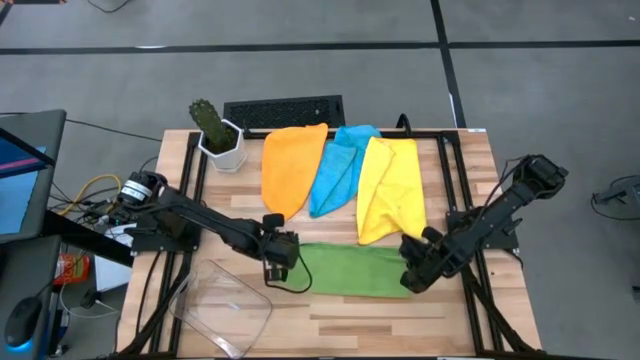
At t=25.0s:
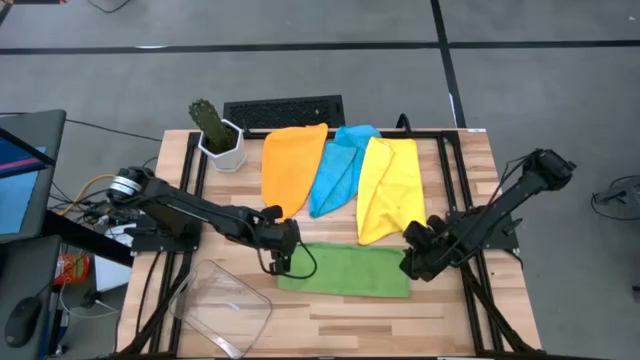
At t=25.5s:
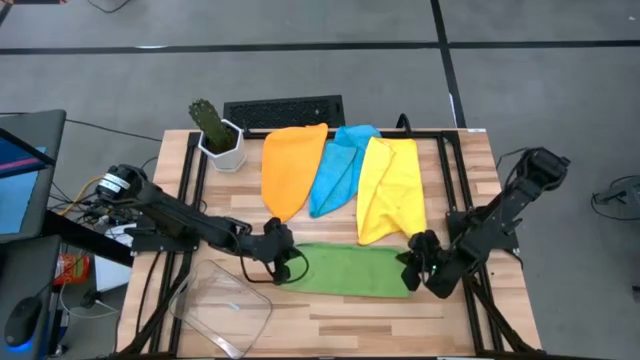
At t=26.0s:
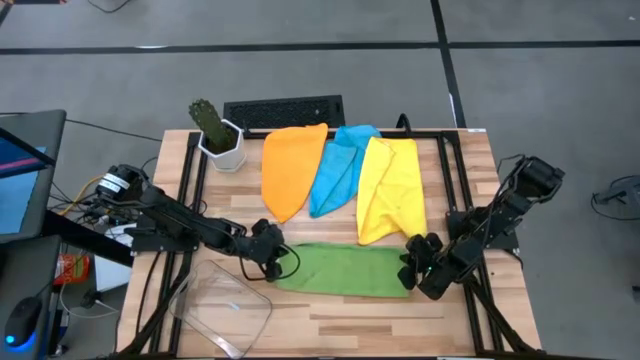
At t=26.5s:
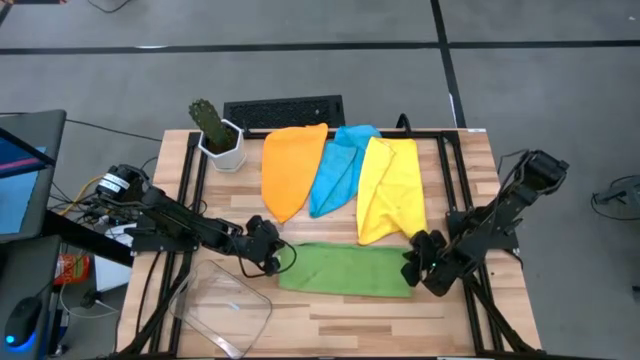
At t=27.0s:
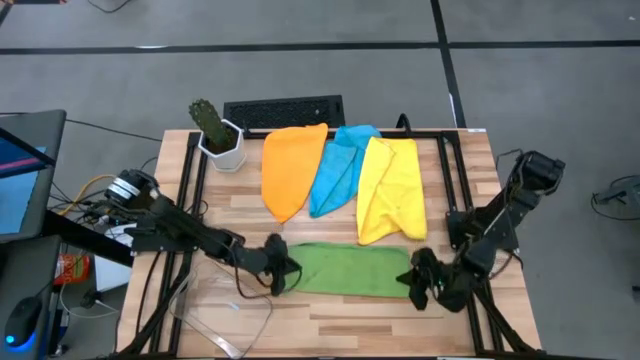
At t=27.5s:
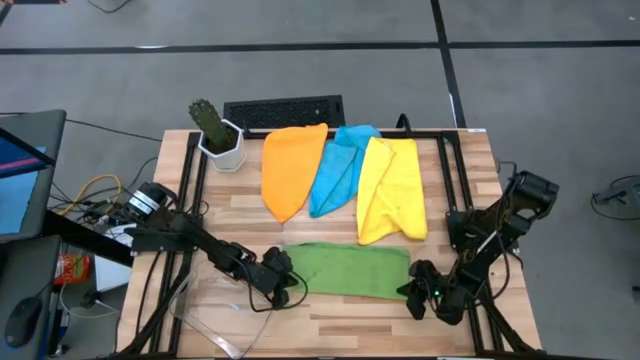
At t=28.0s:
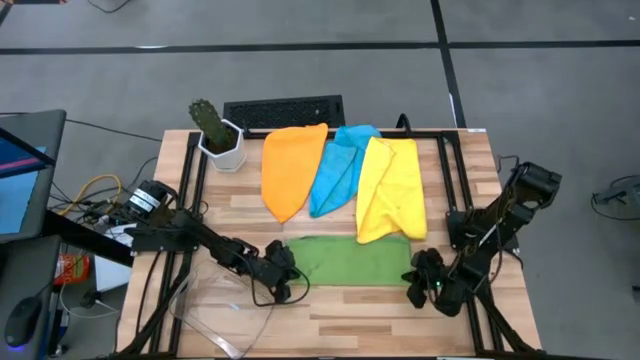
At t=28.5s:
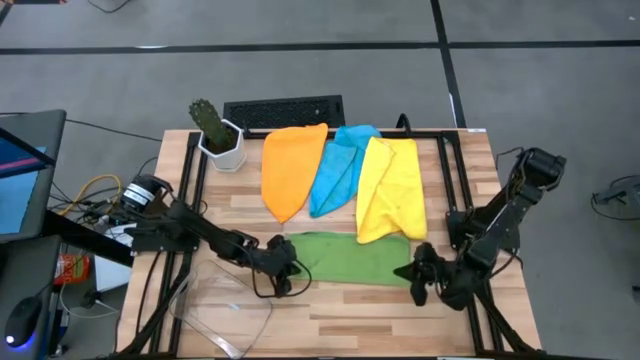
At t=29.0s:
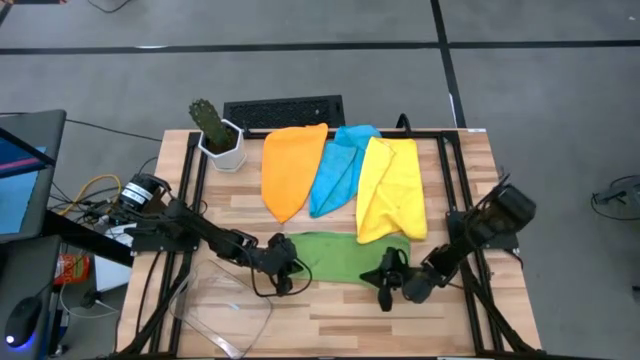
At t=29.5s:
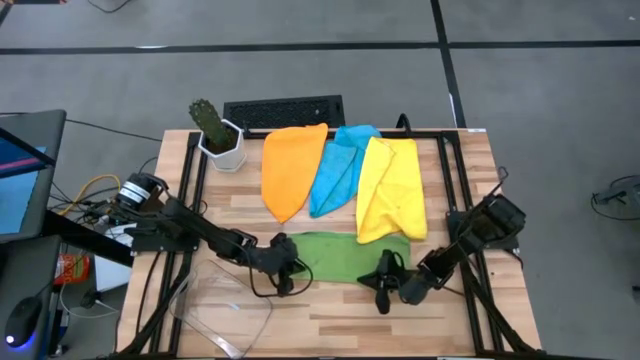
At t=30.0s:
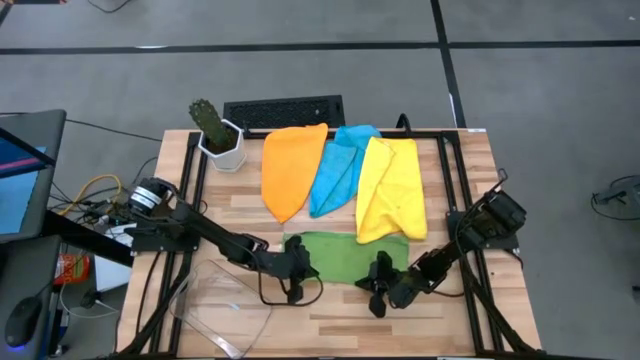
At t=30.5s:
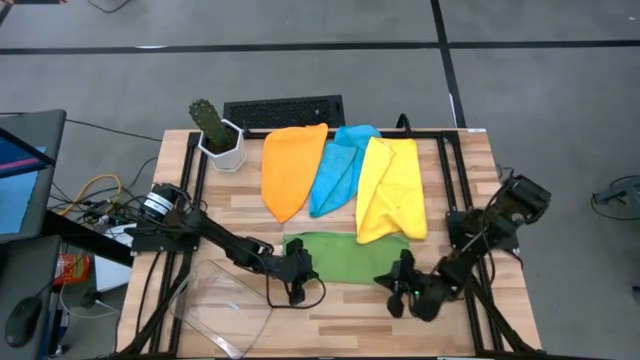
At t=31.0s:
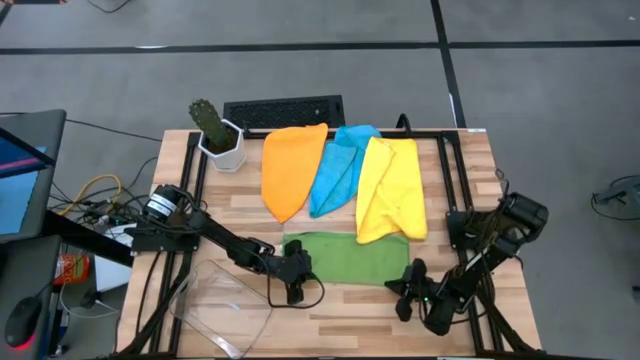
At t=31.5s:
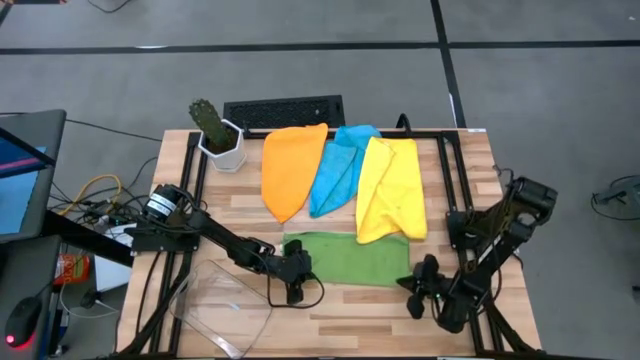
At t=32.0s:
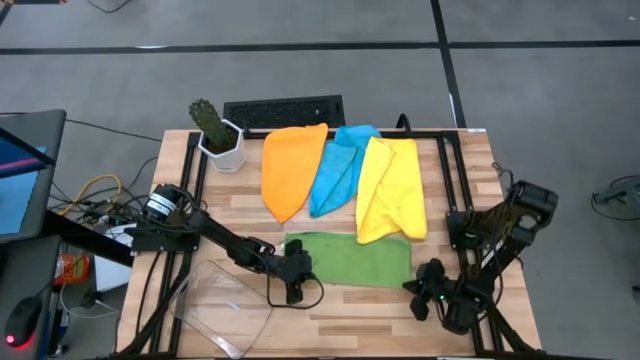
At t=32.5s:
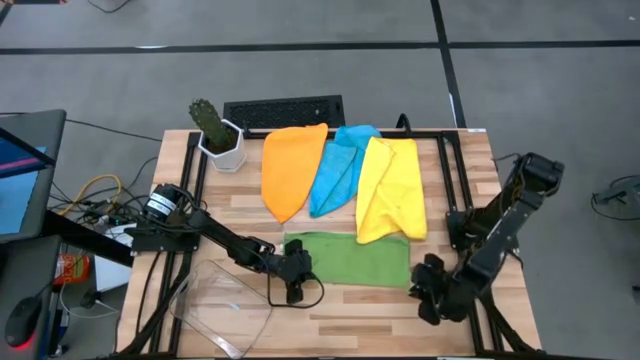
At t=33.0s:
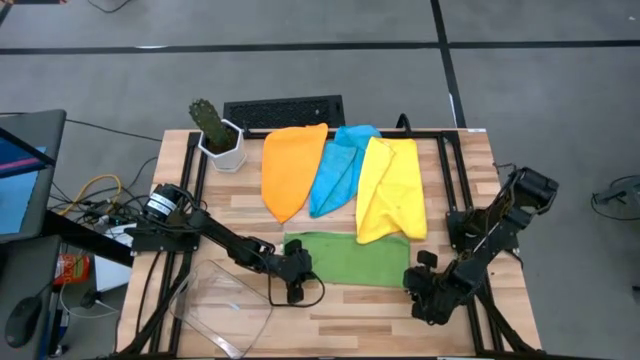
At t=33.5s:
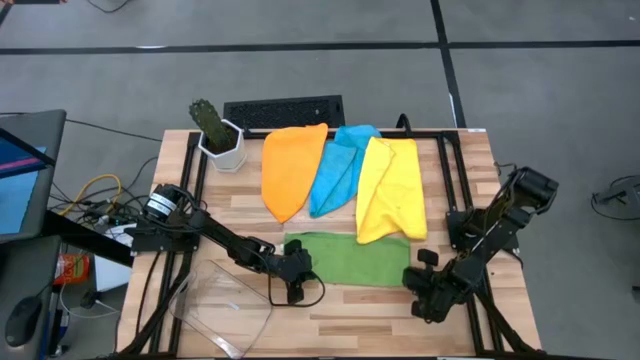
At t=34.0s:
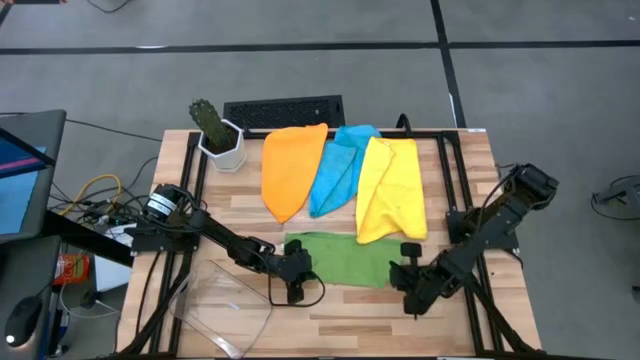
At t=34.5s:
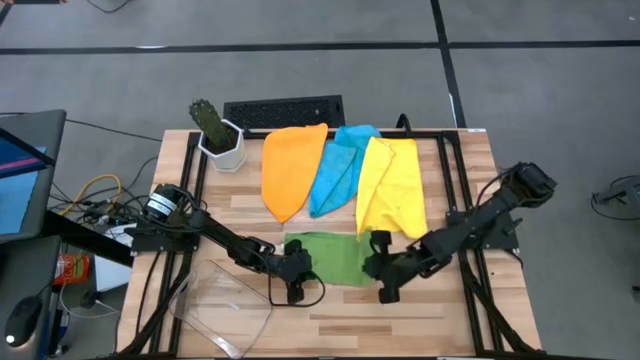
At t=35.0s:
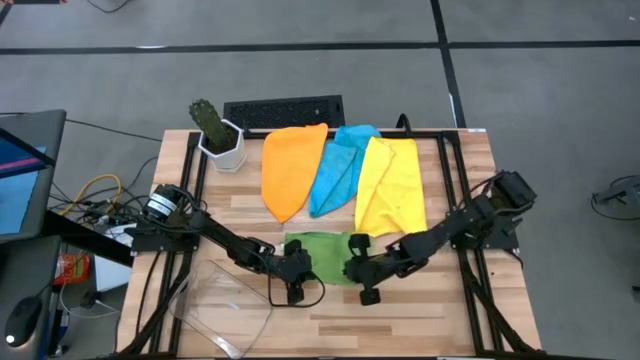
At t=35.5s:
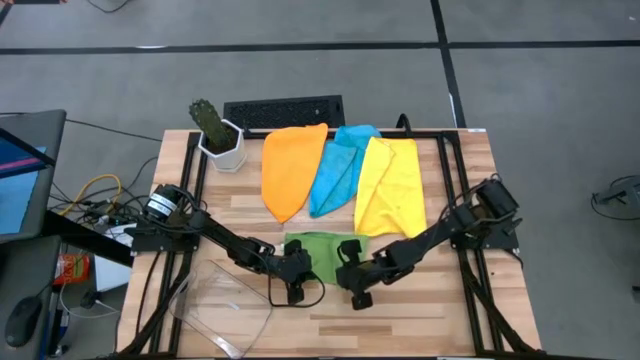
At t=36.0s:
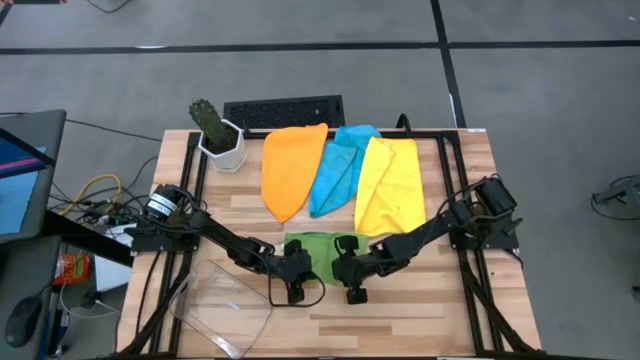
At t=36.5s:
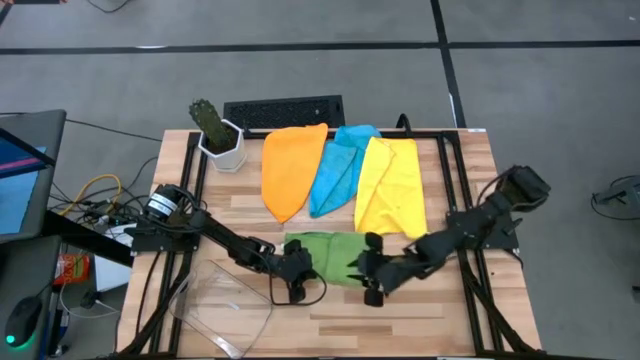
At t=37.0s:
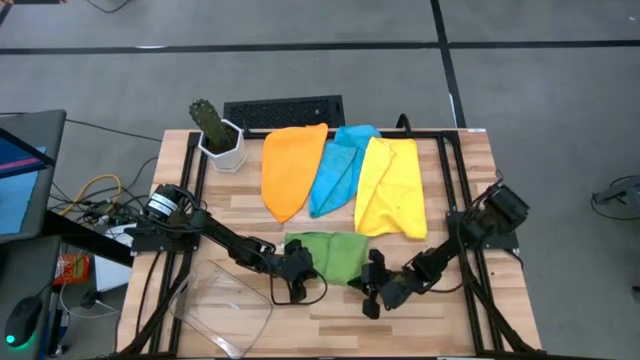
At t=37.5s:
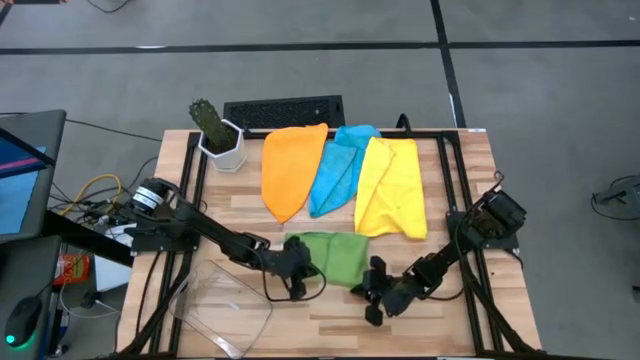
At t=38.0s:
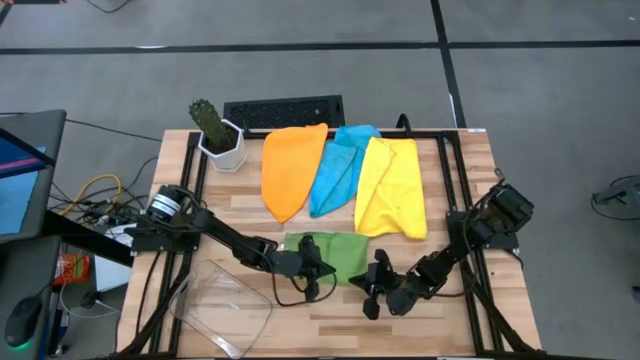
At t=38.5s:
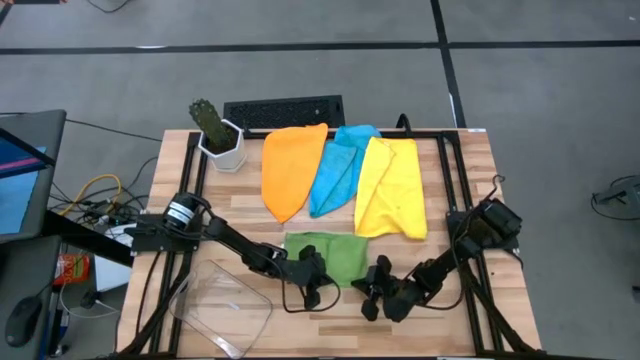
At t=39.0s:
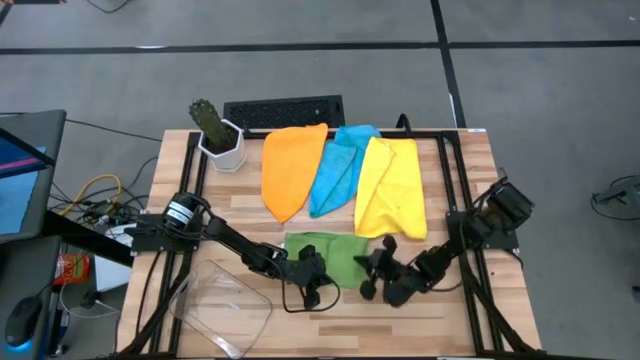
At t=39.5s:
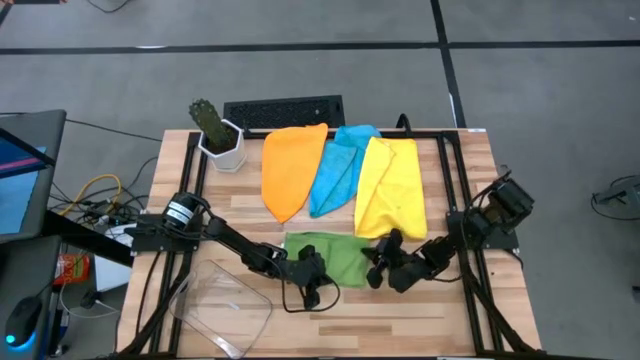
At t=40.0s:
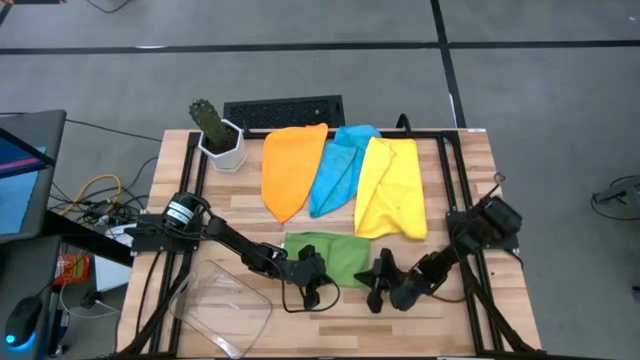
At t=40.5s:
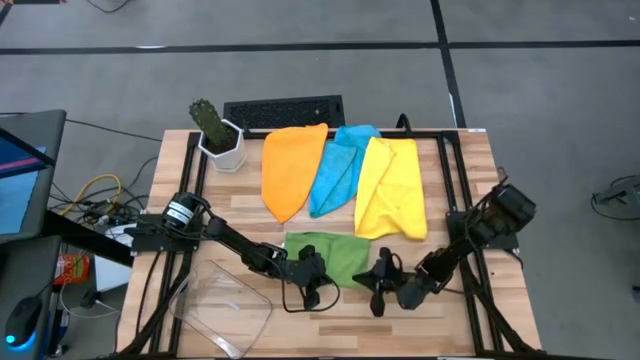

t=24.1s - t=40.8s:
Task: Fold microfiber towels
Fold the green microfiber towel

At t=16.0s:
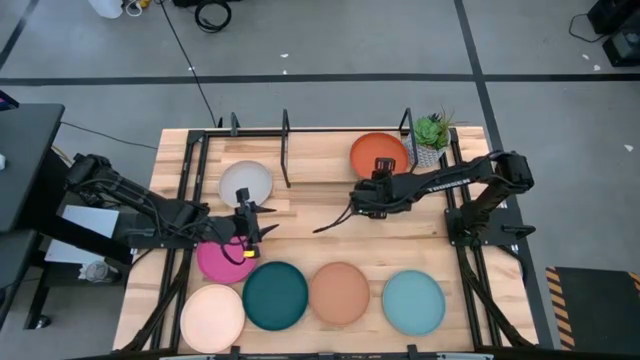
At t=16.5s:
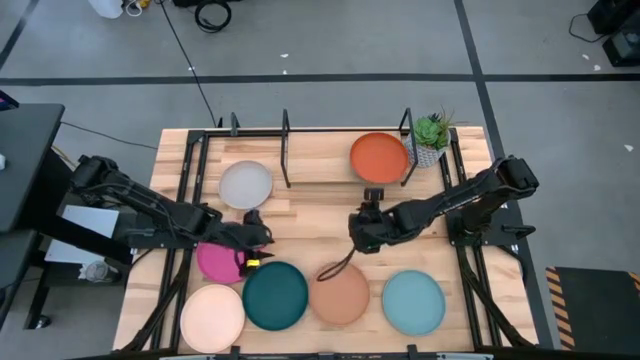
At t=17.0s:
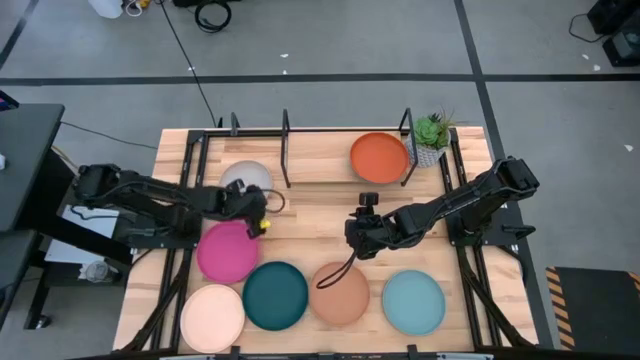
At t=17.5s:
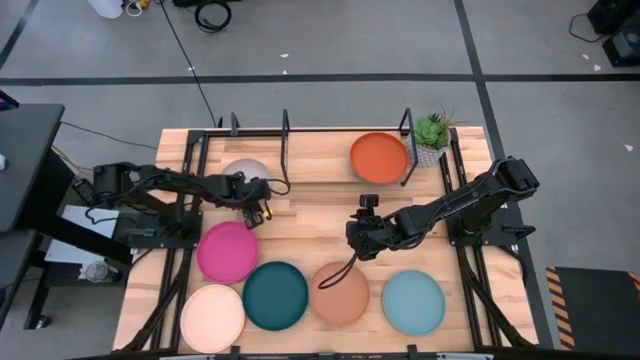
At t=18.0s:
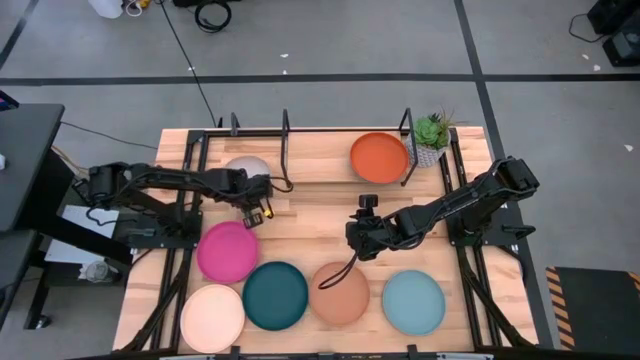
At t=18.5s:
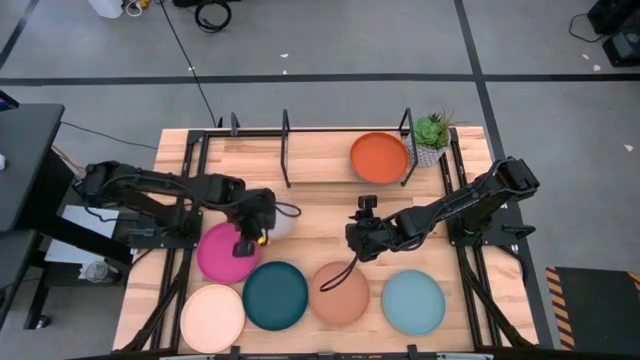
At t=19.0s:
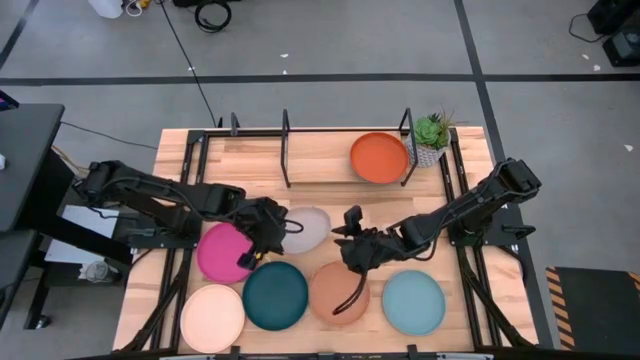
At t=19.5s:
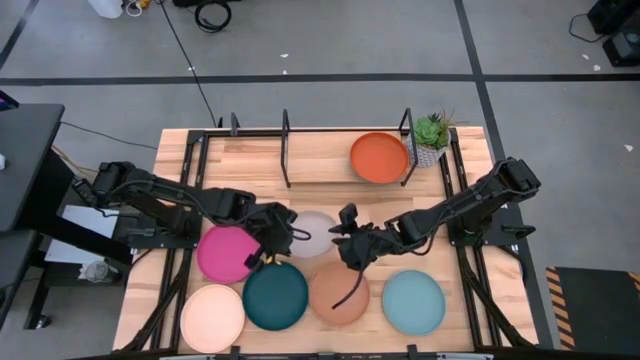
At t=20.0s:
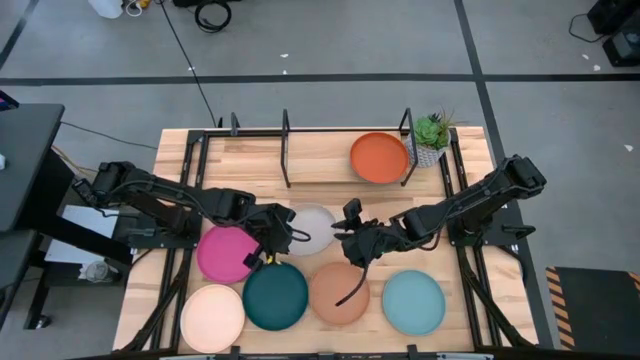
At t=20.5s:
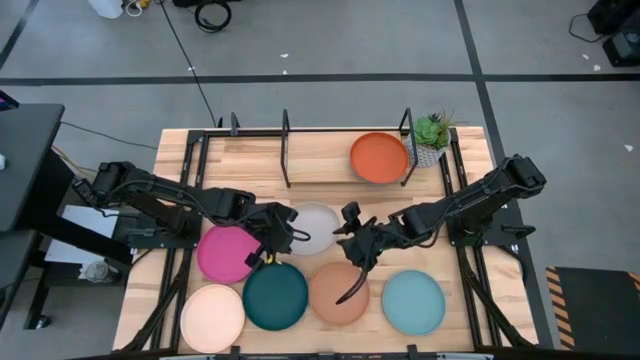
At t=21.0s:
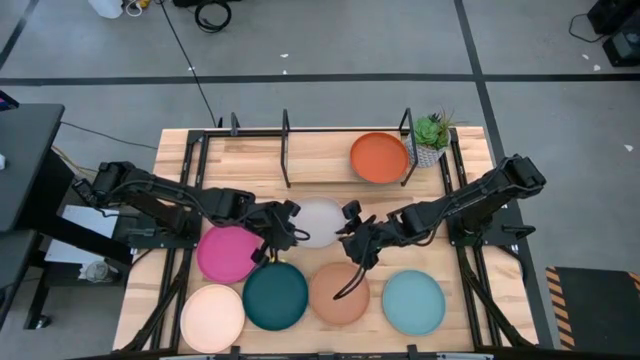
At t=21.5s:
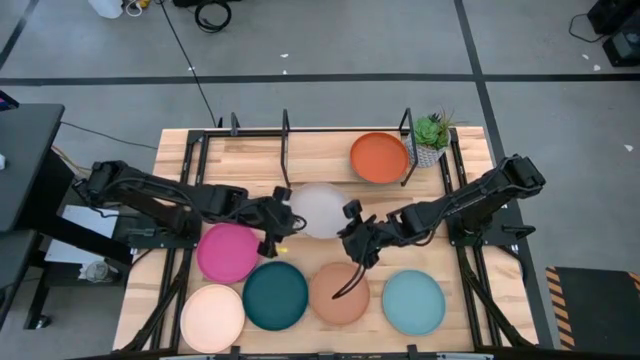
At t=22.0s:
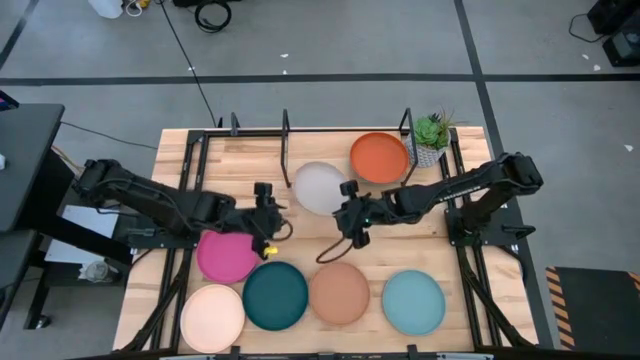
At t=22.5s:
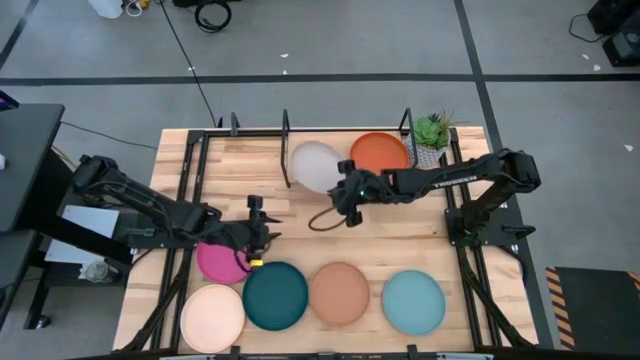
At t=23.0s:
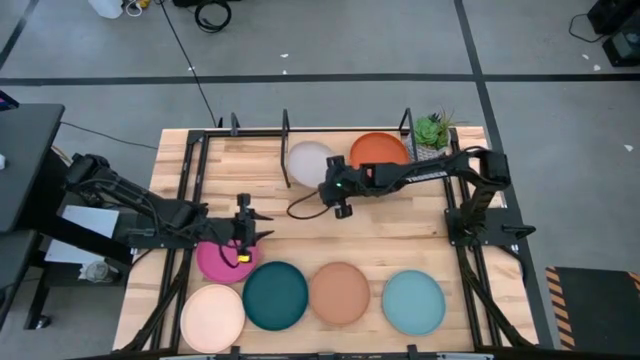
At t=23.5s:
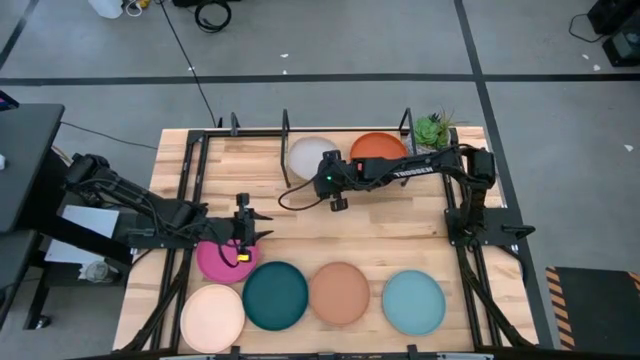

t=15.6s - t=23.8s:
Task: Place and stack plates onto a shelf
Put the gray plate on the shelf
